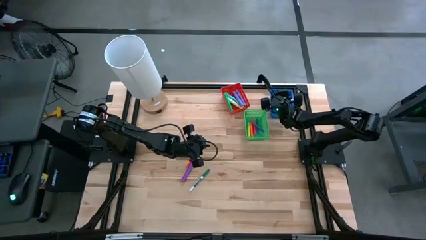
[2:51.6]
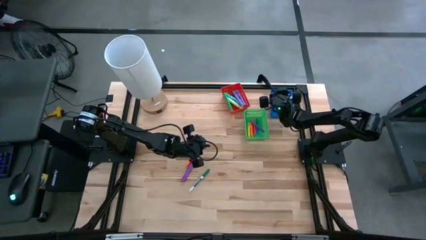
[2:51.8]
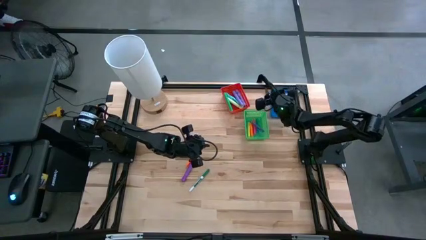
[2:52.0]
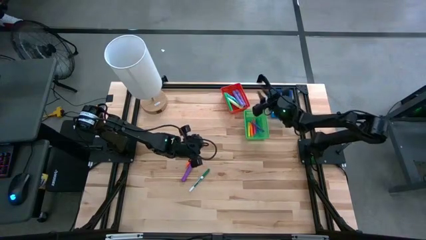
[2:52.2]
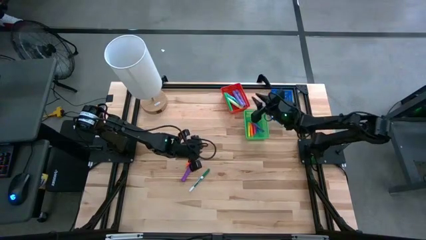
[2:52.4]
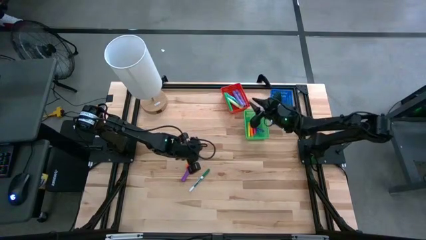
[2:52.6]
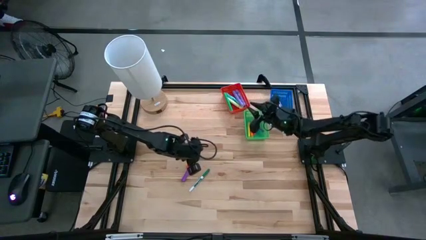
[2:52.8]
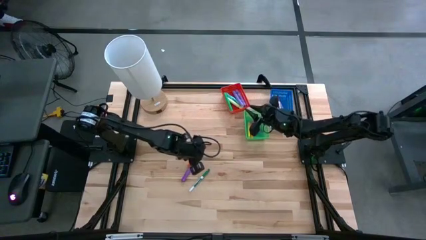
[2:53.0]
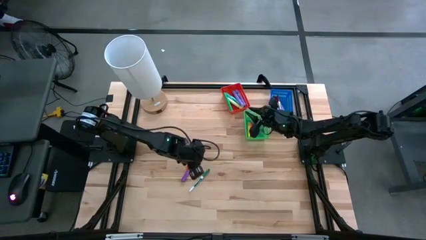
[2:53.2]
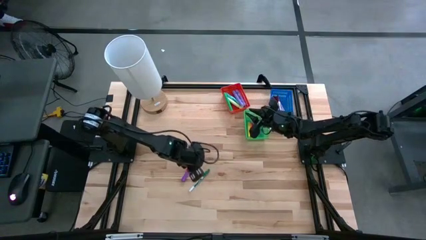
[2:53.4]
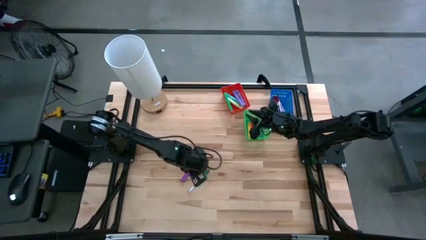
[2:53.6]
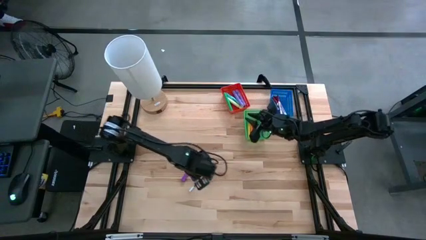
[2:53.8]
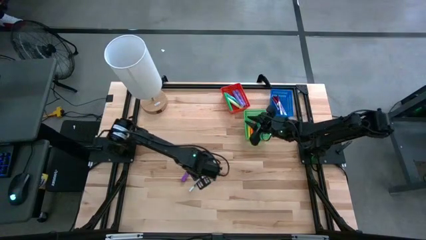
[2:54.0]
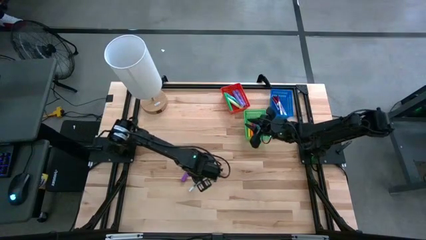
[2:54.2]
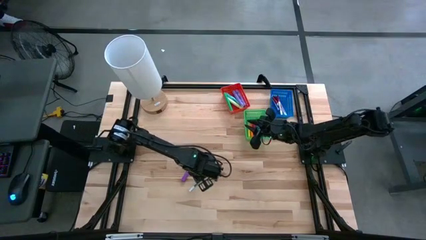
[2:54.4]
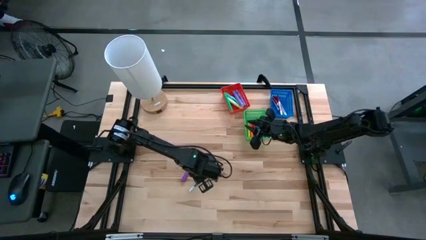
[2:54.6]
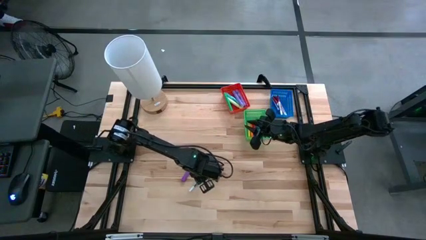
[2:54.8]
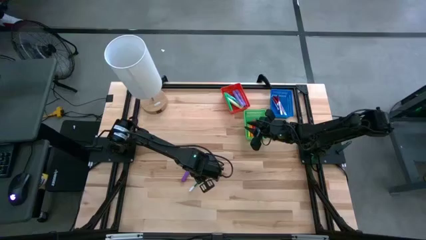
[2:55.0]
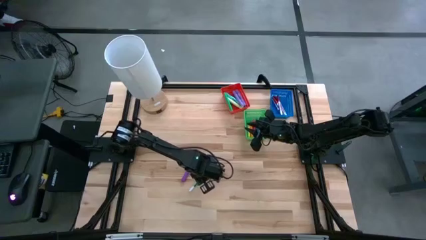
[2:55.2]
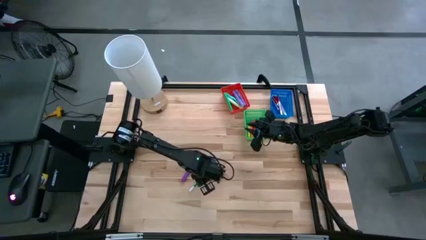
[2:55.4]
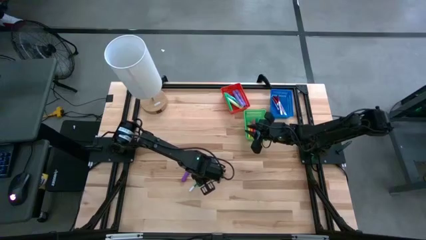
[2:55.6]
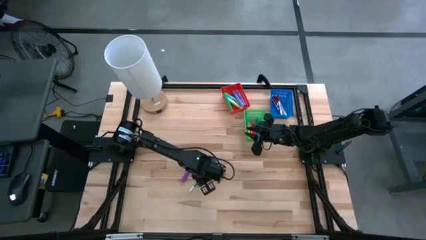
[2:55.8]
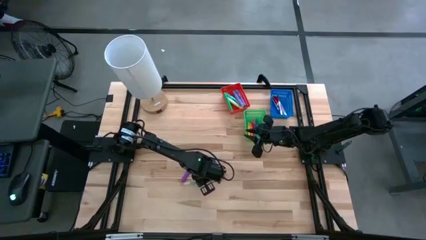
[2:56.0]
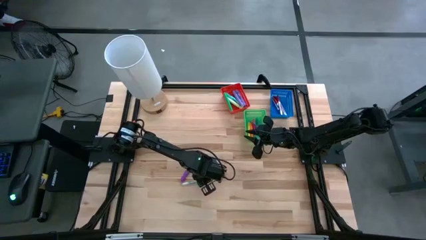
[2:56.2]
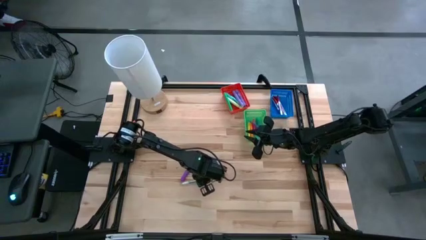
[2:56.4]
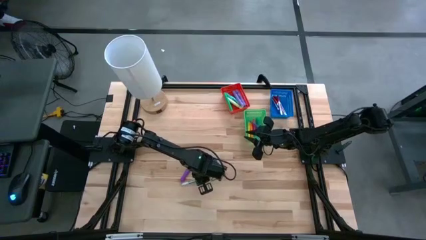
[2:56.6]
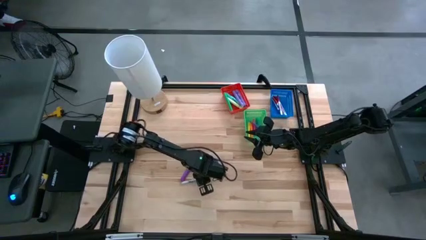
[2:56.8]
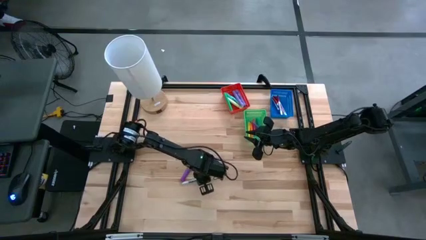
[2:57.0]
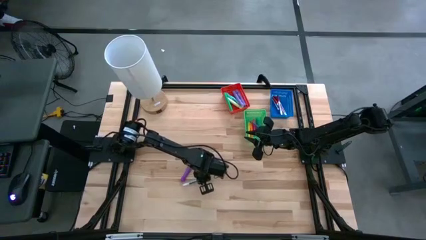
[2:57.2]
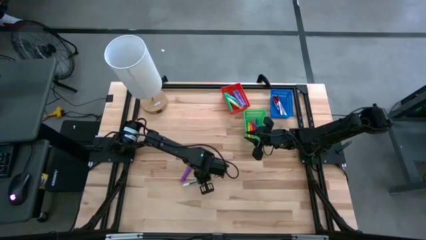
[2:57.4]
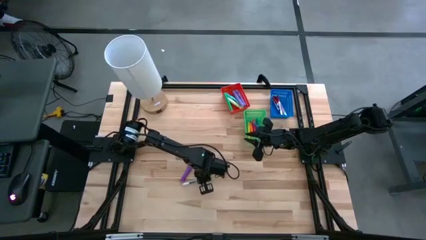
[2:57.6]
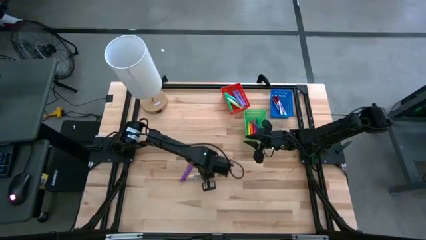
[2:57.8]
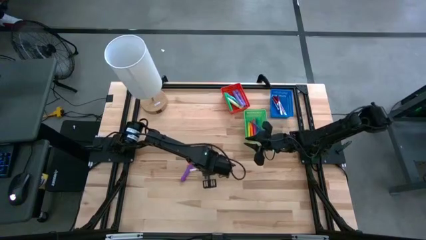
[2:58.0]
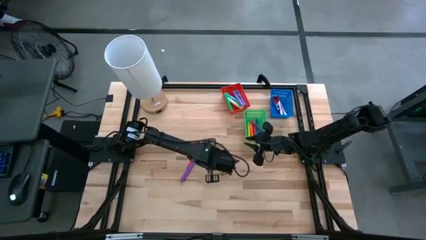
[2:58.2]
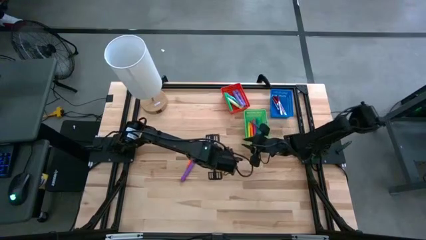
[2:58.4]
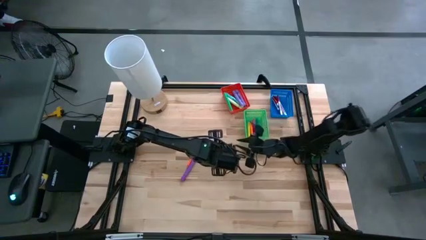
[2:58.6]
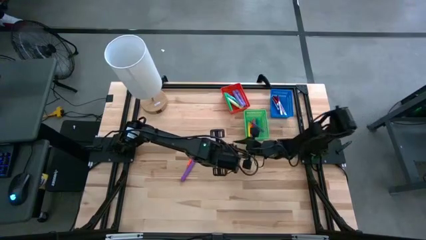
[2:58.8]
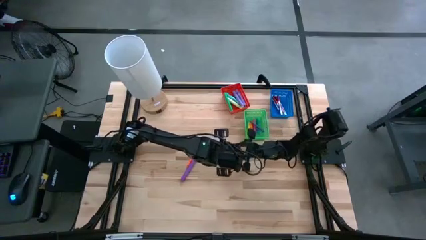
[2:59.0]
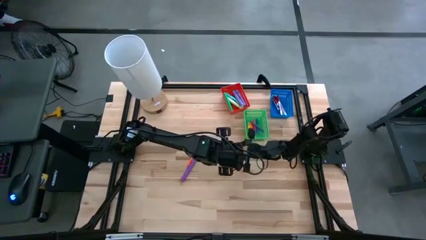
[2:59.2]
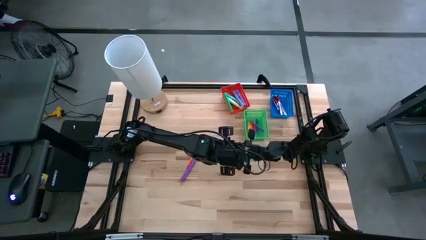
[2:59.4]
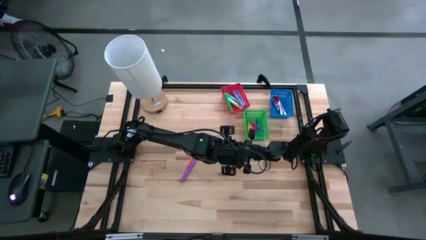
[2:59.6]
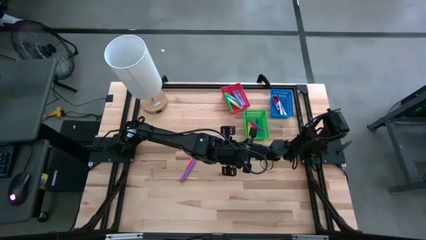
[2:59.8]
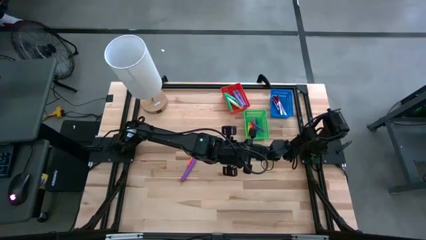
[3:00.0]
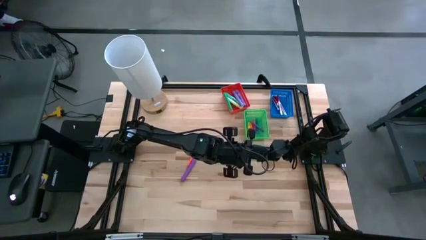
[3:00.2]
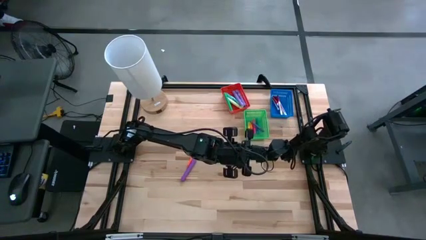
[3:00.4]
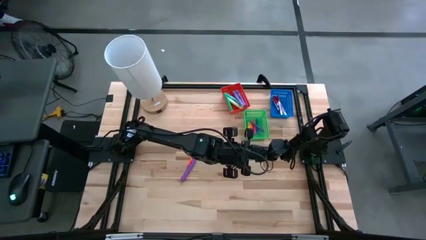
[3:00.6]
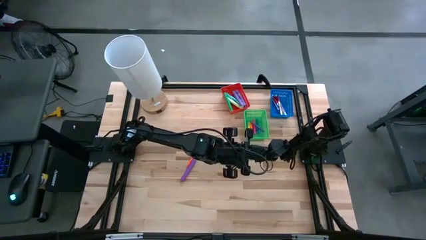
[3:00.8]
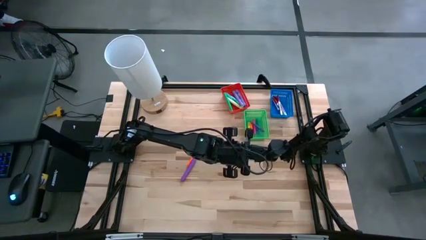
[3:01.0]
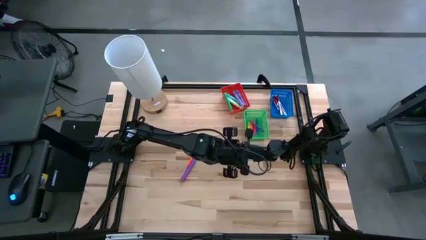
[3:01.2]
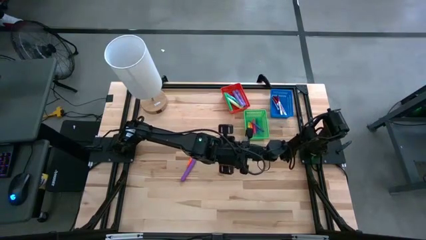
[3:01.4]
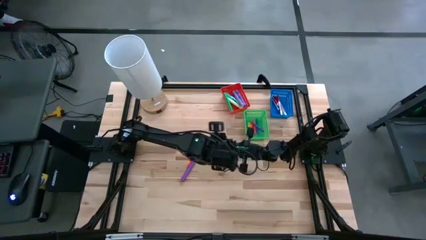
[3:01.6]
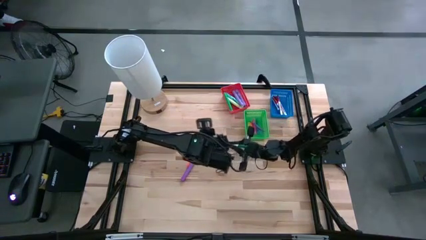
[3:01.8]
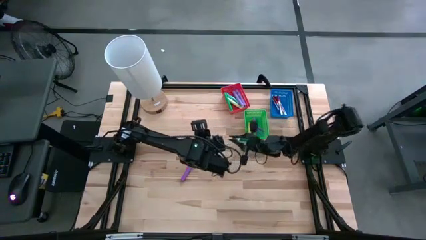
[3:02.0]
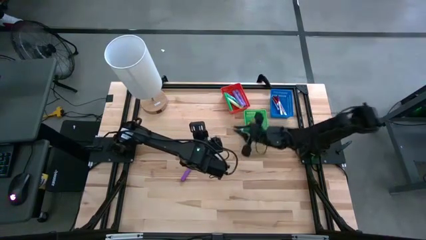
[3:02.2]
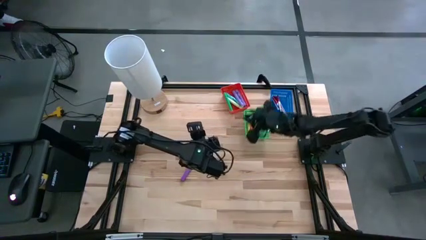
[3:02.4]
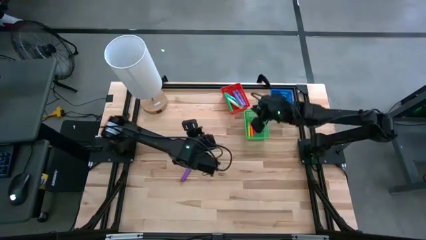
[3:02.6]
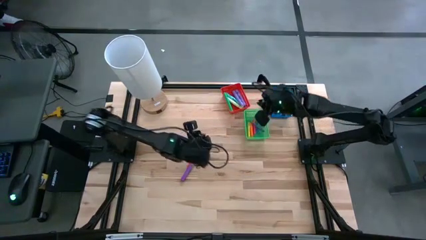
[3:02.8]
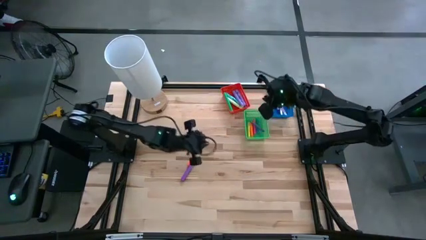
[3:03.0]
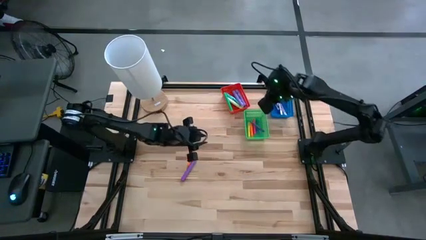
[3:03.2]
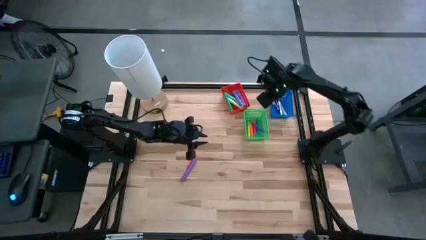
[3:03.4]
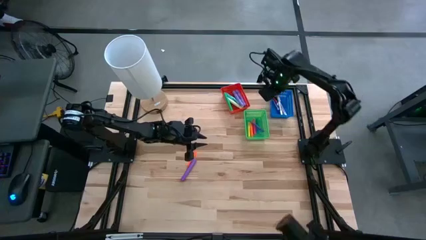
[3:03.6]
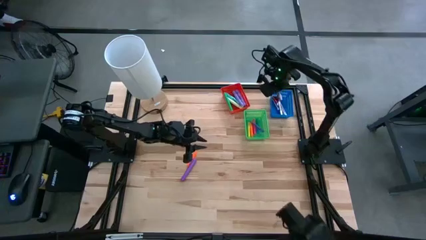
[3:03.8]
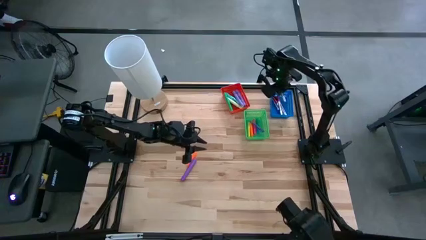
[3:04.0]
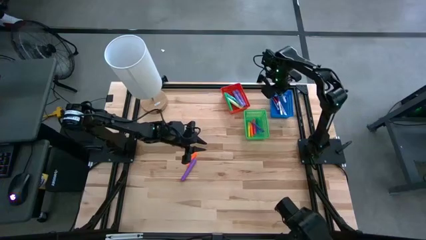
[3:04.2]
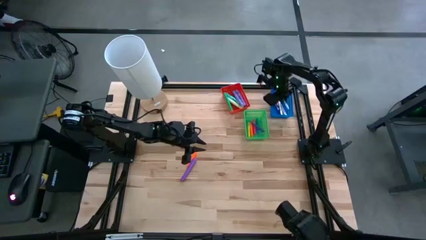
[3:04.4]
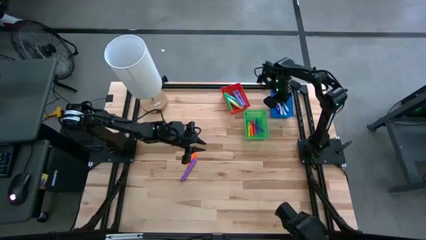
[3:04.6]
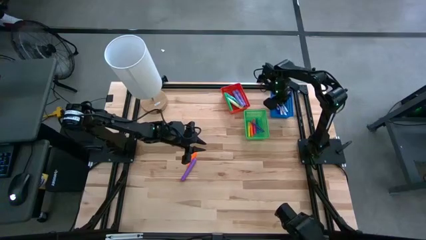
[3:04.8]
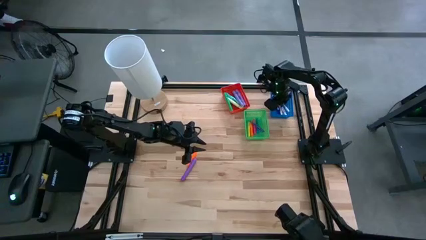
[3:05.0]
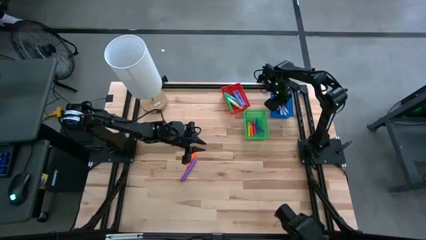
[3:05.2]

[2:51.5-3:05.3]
Task: Pick & Place Markers
Put the green marker in the blue bin
